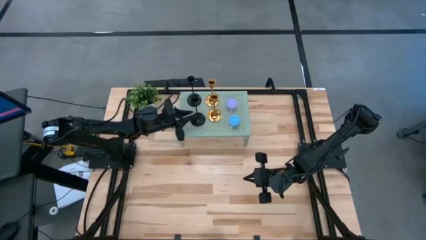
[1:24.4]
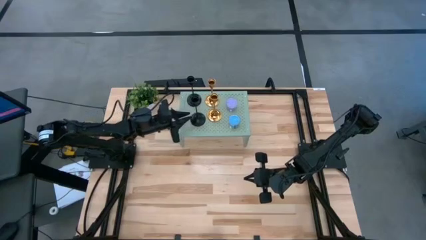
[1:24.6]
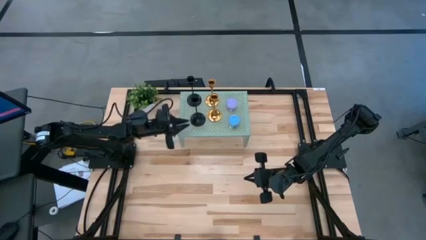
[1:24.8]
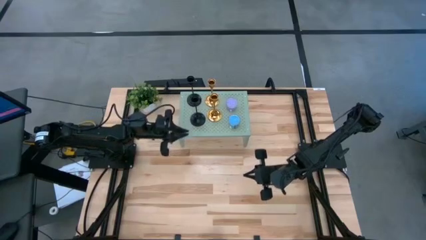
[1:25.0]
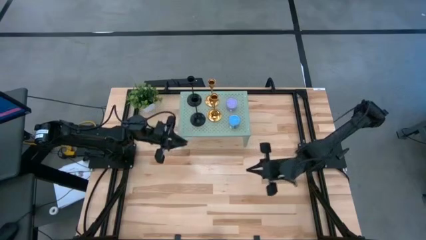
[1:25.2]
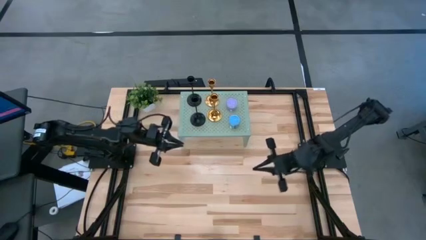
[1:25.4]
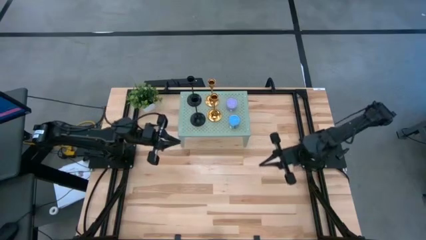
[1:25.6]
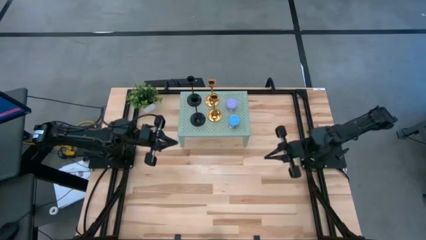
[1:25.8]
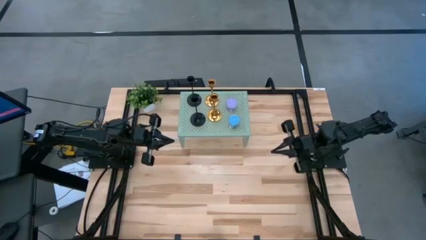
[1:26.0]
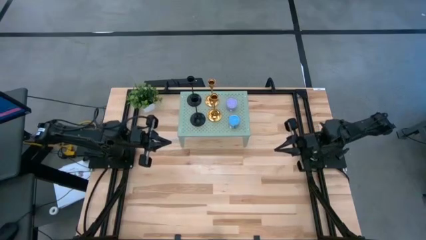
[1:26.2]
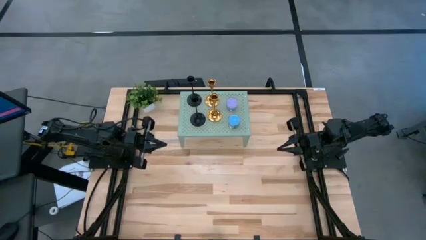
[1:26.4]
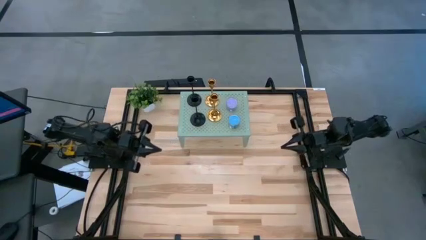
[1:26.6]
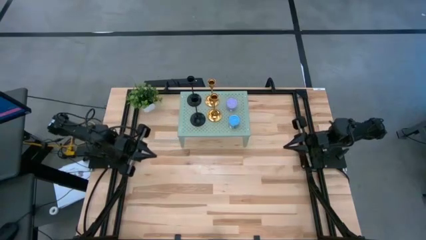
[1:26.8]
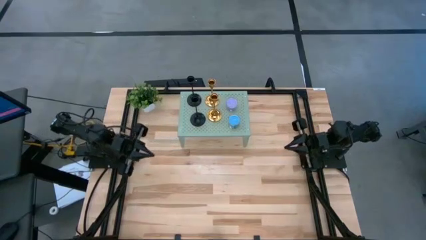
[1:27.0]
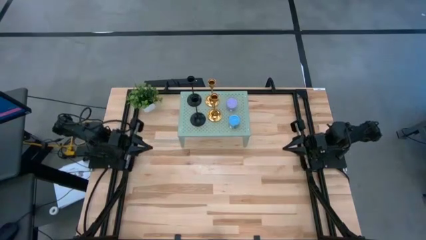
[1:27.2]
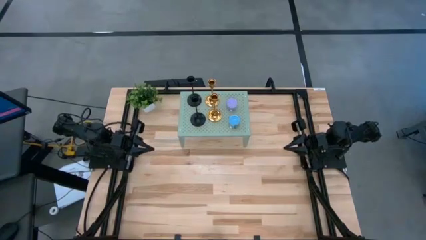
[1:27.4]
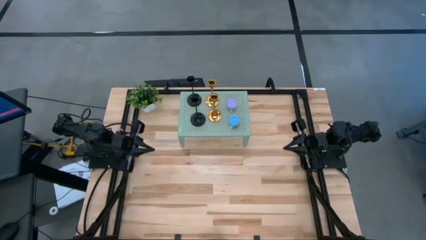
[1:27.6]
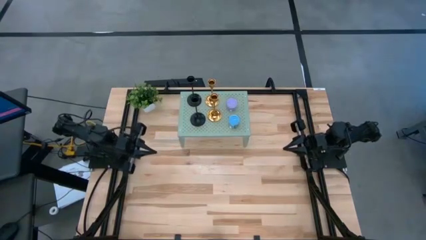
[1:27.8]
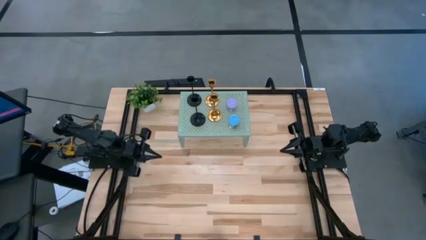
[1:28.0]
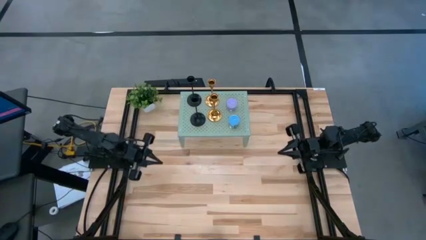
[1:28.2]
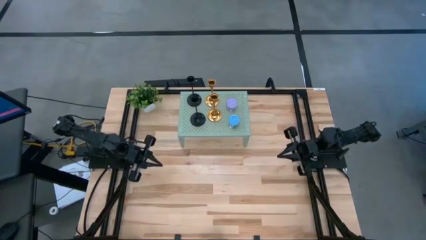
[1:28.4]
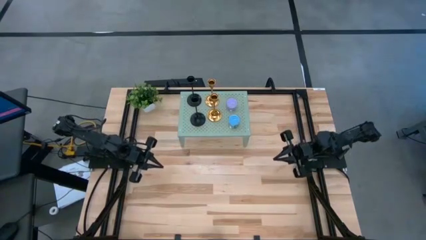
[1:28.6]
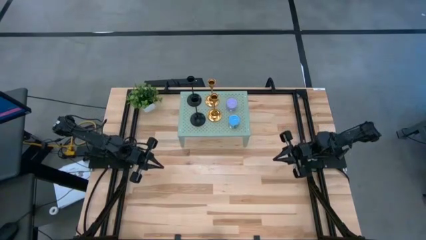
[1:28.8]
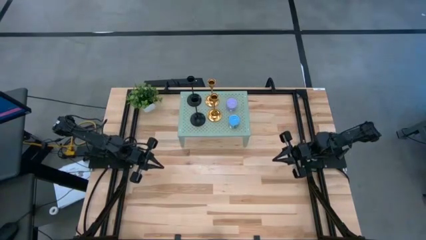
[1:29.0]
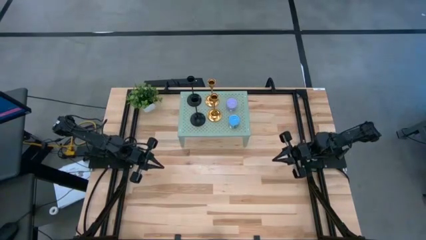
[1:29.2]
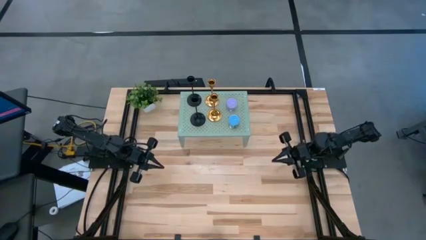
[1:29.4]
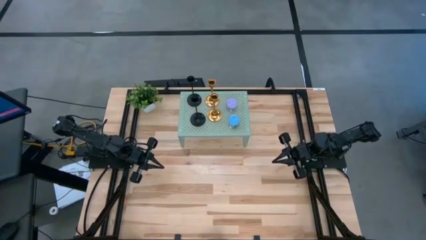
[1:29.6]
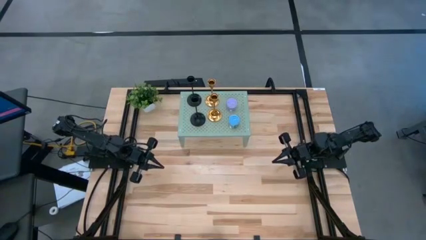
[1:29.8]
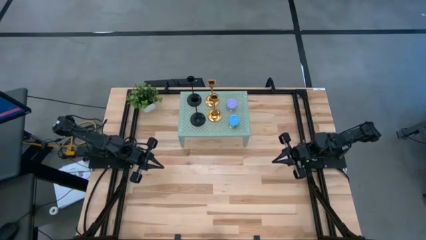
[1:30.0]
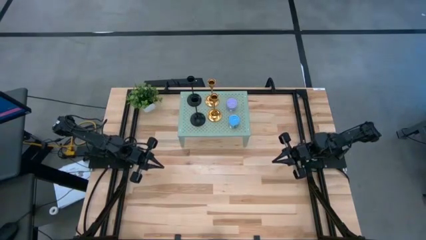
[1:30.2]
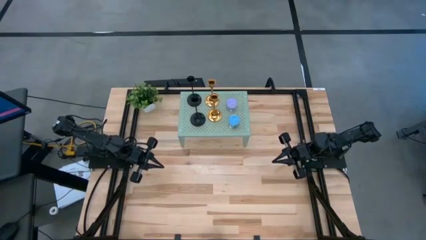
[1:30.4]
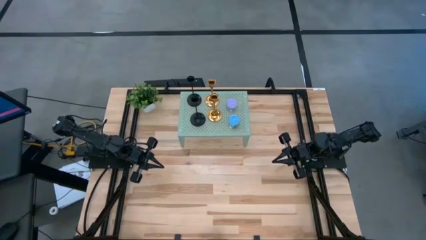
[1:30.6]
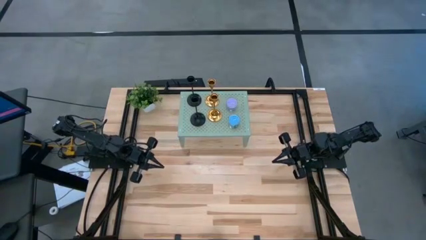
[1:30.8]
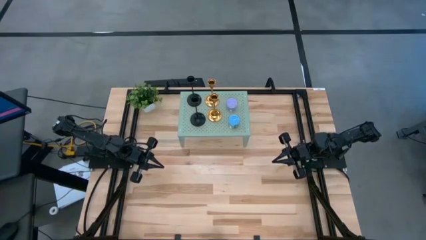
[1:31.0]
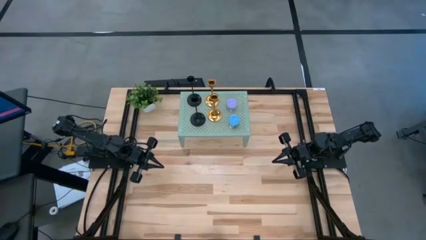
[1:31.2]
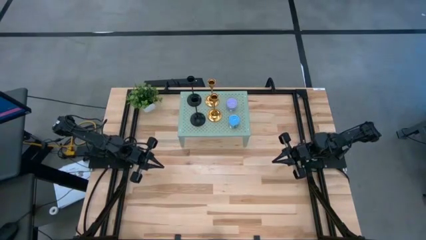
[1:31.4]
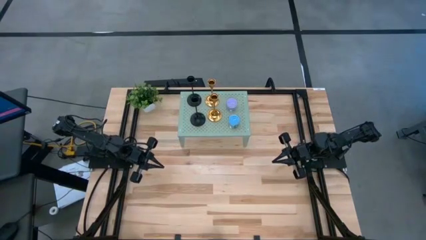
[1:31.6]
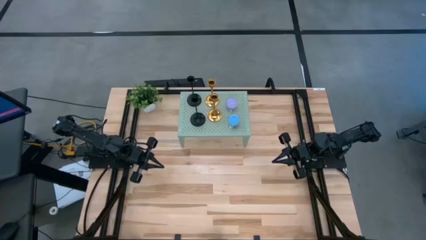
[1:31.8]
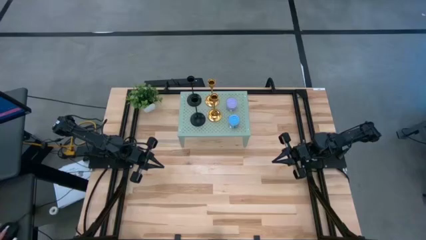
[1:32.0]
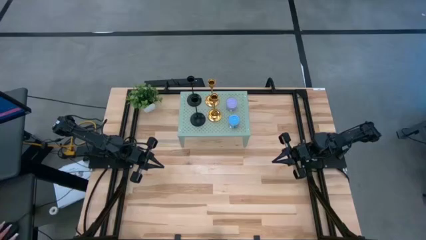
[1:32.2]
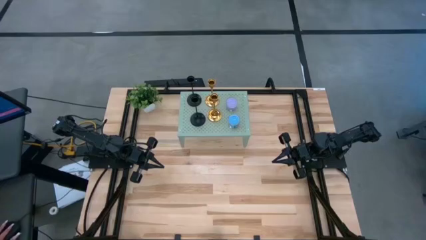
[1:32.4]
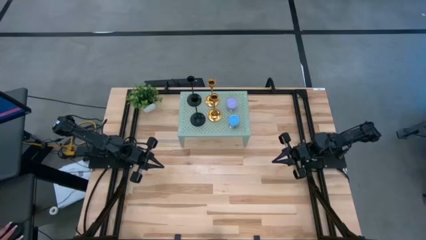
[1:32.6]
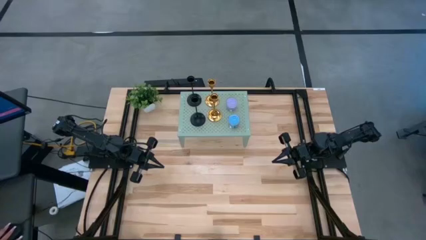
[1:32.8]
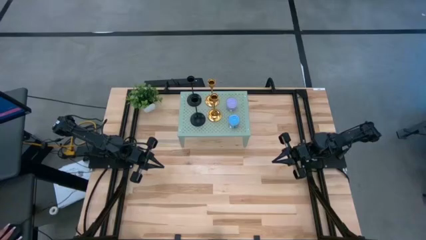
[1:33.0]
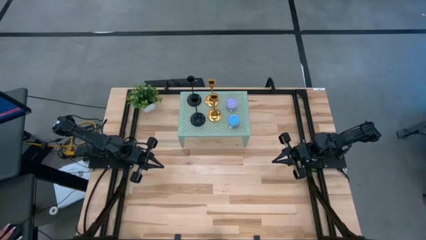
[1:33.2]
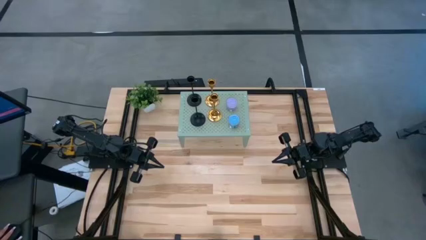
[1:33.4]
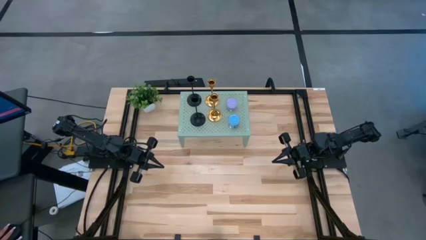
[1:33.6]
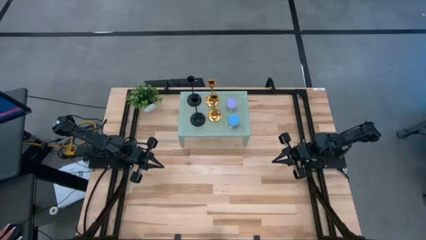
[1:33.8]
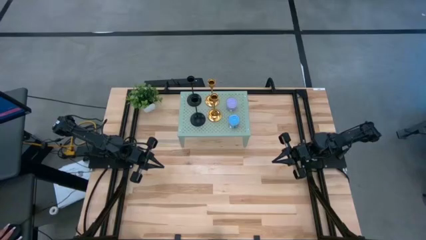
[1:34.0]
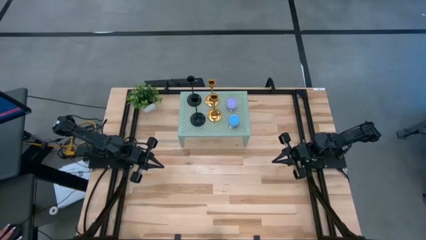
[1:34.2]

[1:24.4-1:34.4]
Task: Pick & Place candle stick holders
Return to Home Position

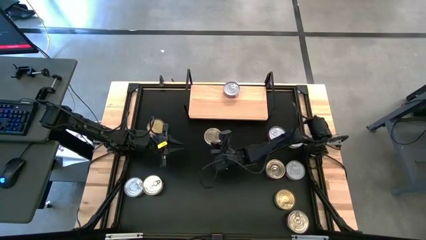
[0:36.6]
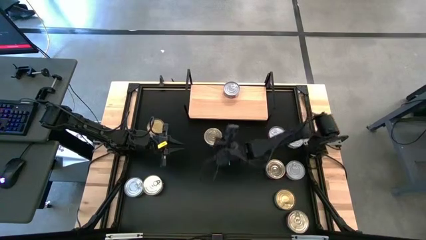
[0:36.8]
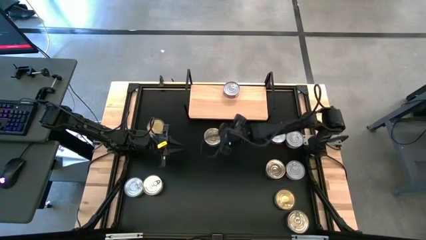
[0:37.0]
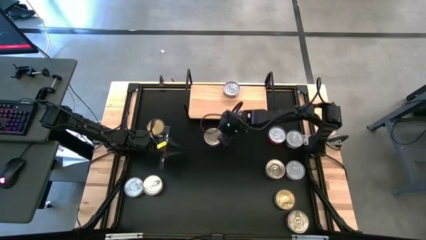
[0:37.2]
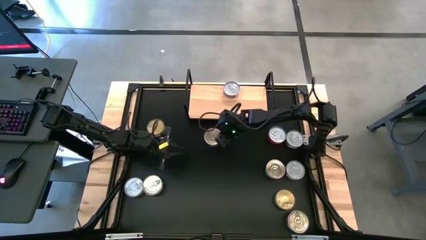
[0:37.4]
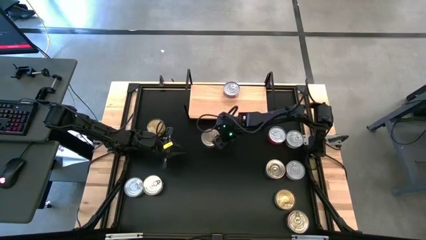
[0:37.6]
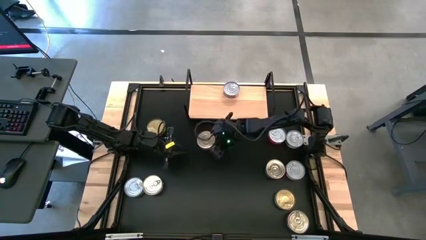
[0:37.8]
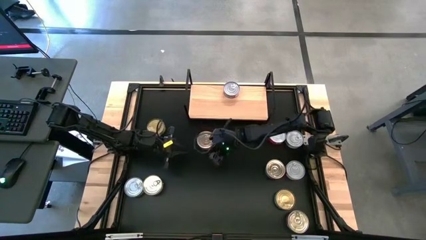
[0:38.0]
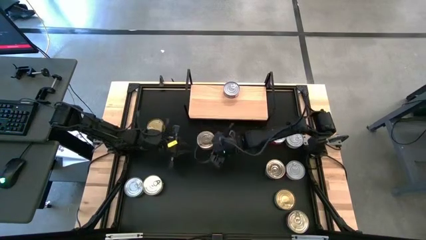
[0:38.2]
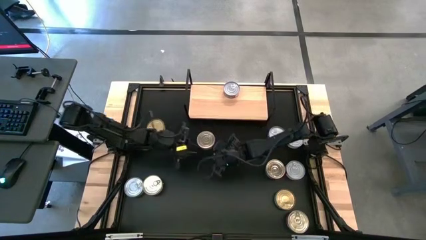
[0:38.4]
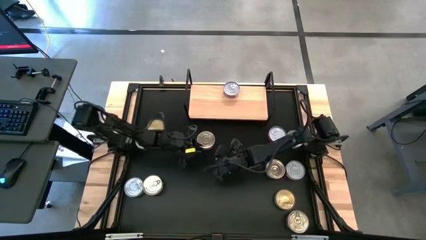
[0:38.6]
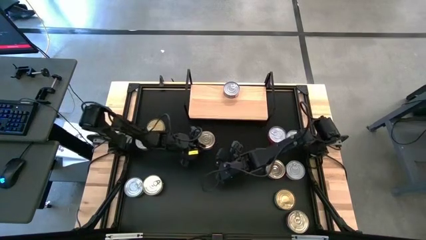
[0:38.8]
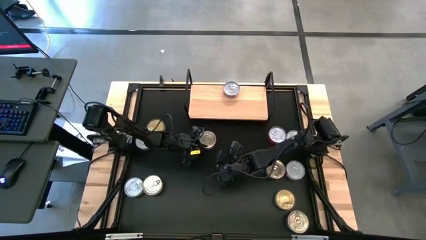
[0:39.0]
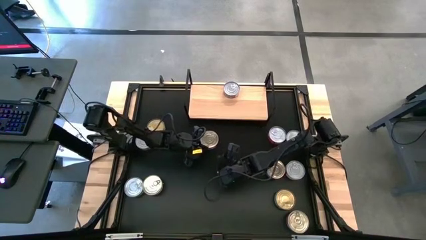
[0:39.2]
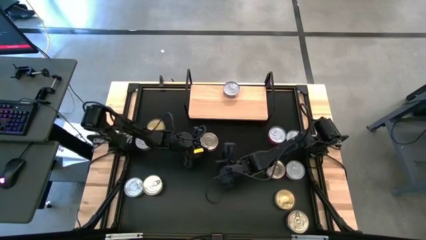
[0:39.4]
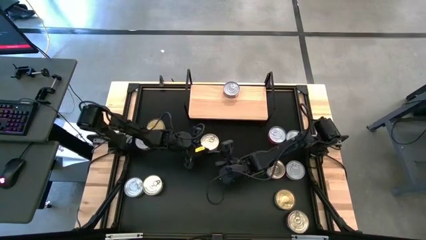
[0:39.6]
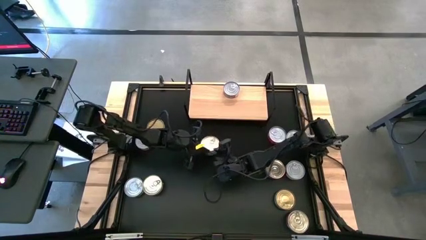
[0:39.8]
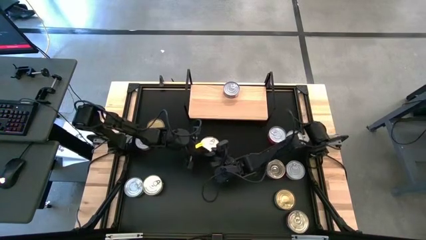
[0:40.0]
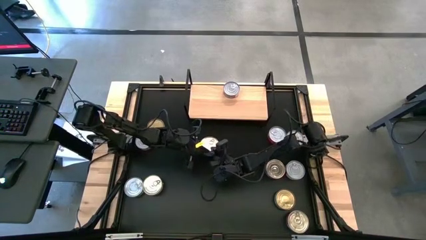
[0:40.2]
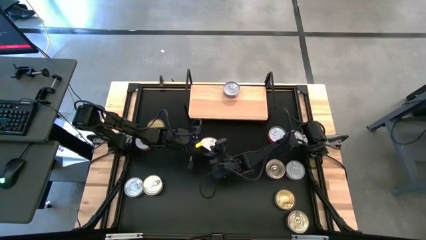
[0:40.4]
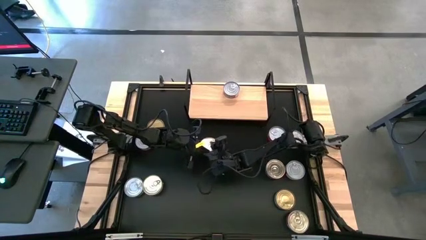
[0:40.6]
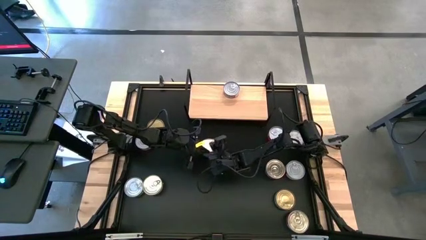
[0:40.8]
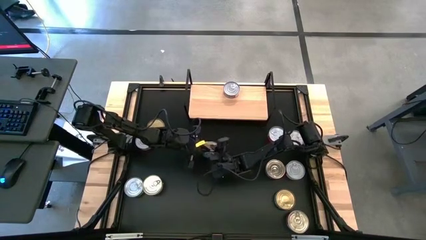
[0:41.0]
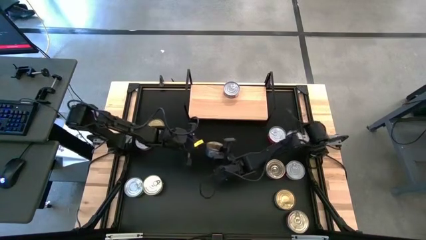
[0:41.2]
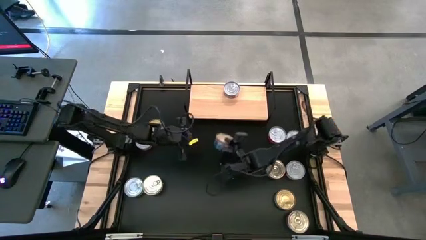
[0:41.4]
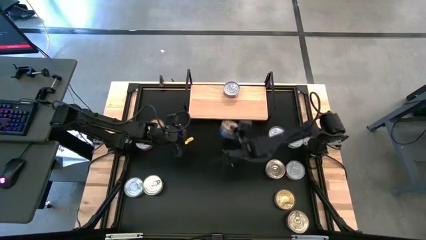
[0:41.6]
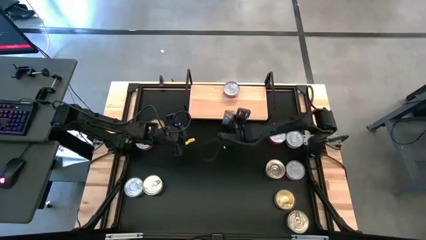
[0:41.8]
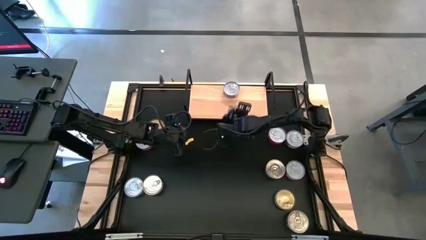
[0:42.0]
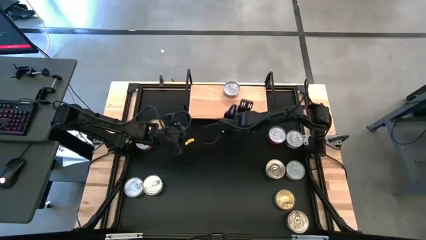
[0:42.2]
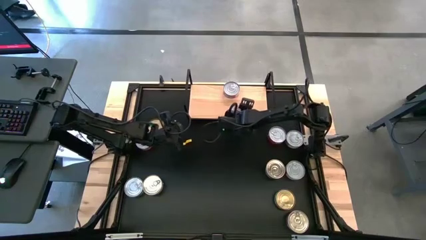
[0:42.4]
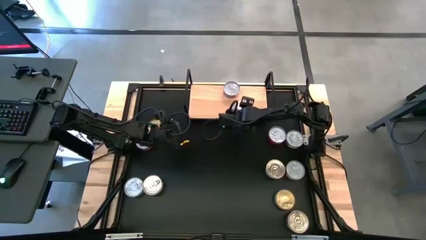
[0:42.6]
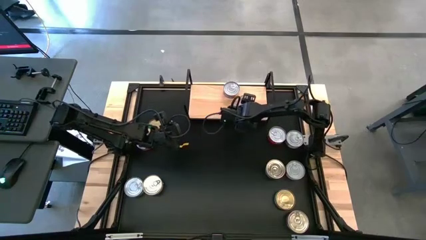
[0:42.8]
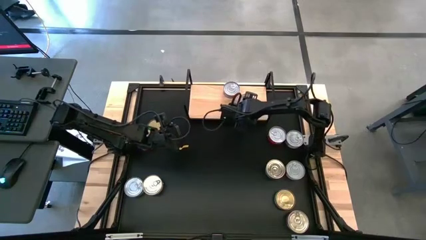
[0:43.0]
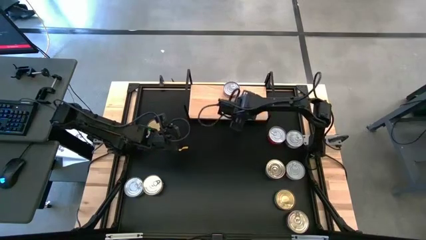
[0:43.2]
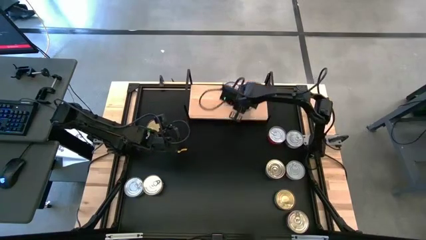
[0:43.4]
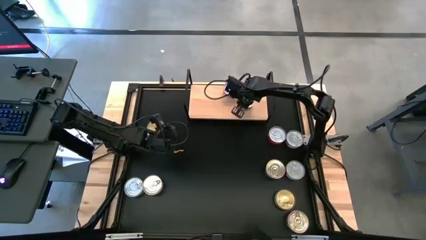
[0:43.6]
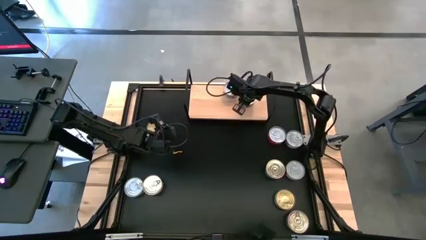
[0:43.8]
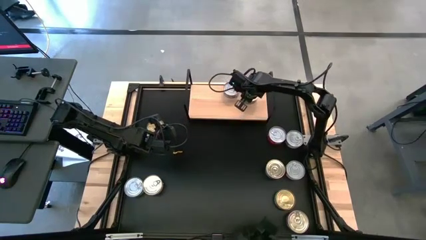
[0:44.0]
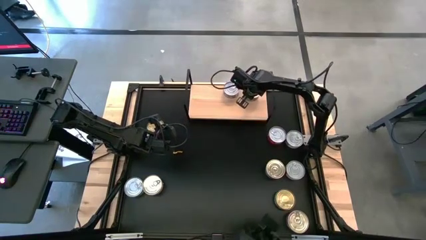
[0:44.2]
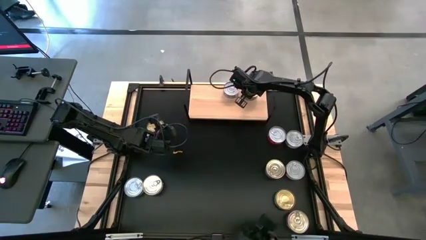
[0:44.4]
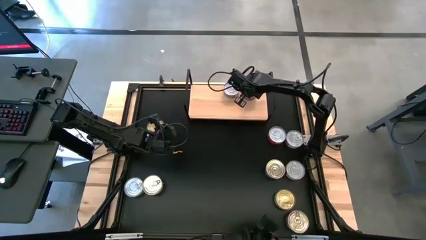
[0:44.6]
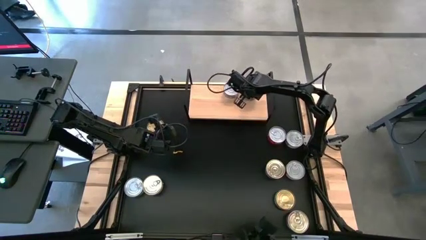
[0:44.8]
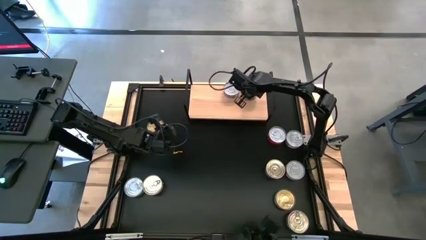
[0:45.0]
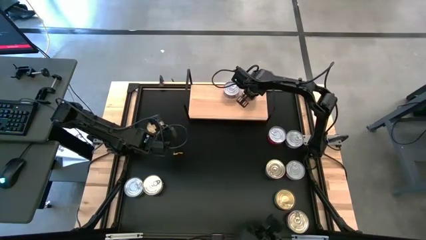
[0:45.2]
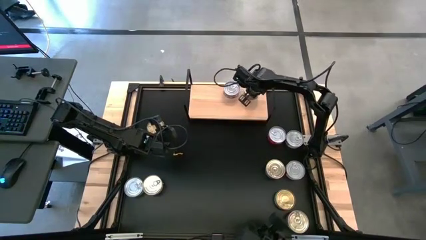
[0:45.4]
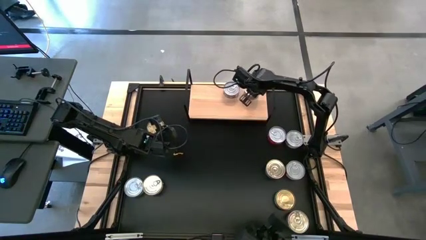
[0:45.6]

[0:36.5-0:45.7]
Task: Stack canned seafood by type on shelf
Put the blue tuna can on the shelf
